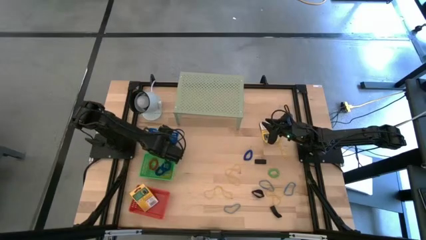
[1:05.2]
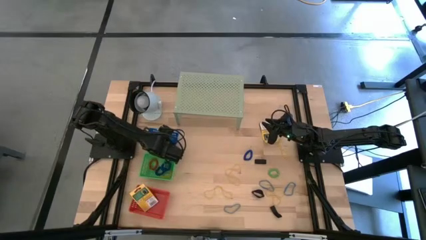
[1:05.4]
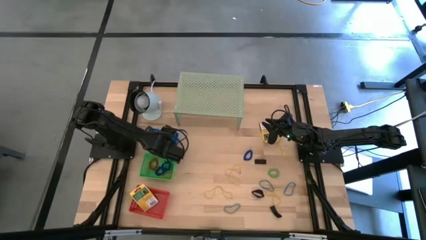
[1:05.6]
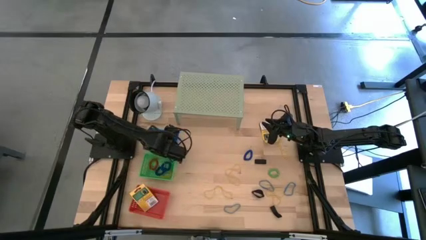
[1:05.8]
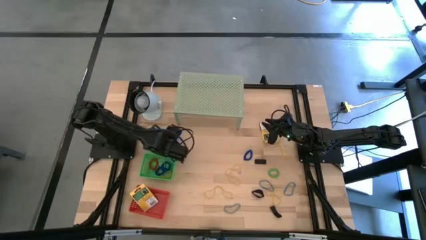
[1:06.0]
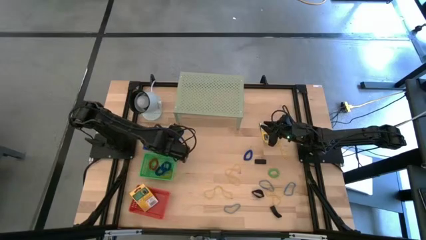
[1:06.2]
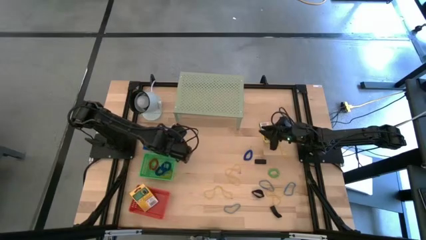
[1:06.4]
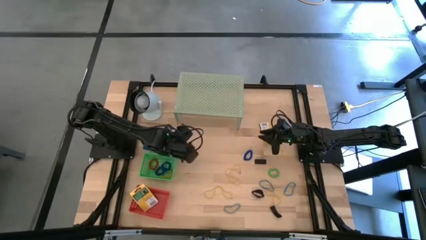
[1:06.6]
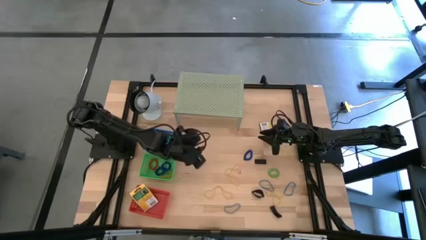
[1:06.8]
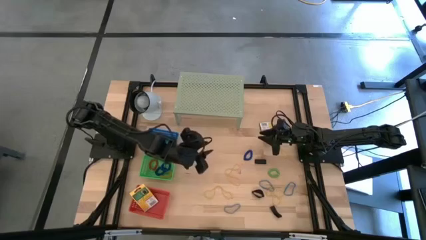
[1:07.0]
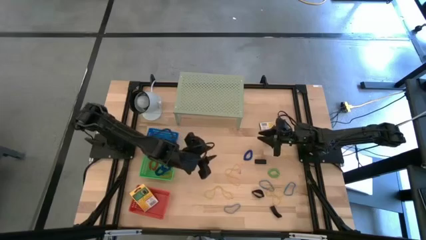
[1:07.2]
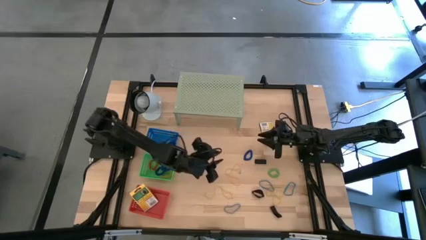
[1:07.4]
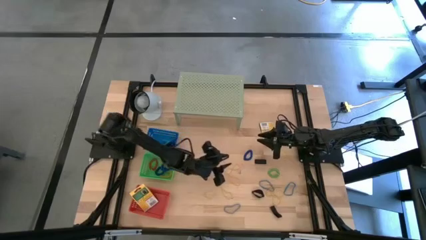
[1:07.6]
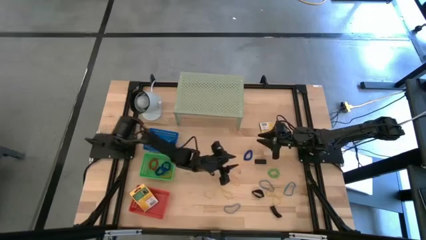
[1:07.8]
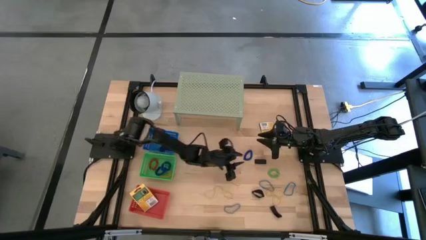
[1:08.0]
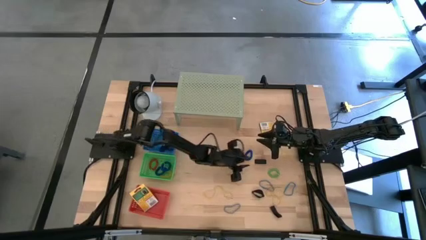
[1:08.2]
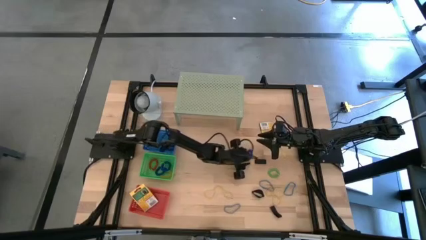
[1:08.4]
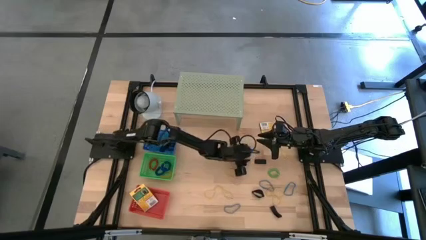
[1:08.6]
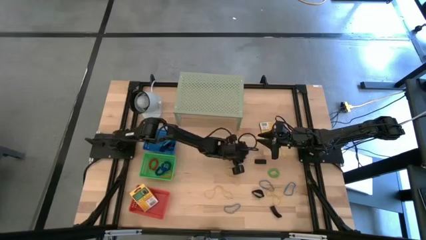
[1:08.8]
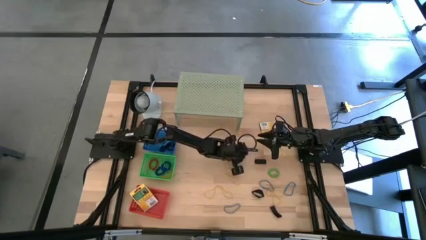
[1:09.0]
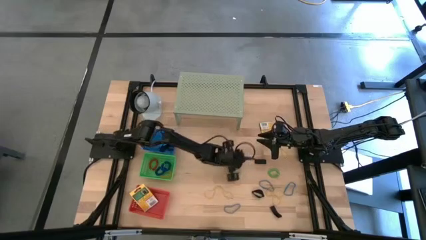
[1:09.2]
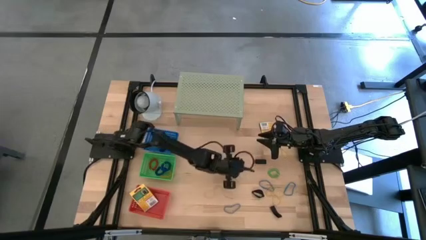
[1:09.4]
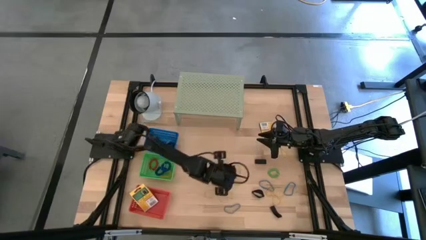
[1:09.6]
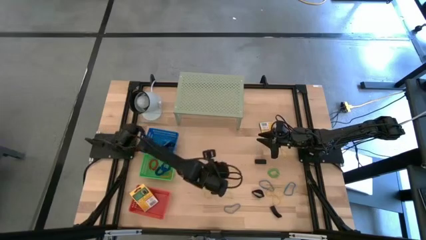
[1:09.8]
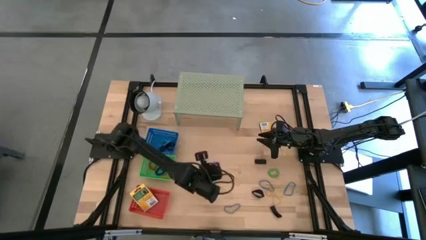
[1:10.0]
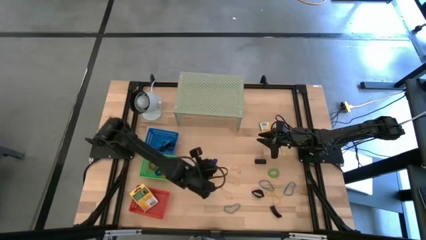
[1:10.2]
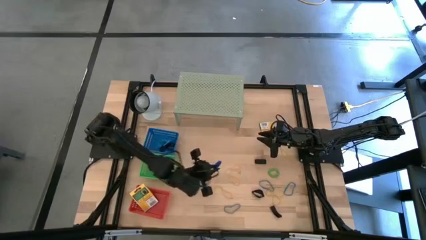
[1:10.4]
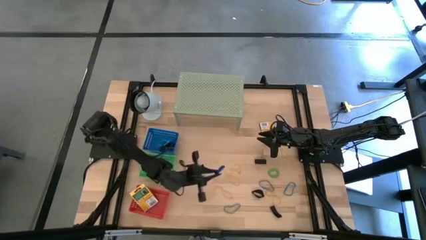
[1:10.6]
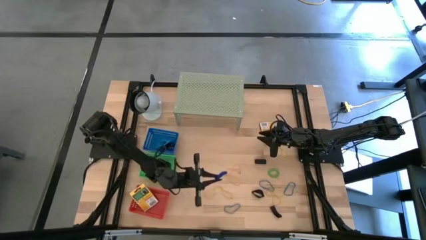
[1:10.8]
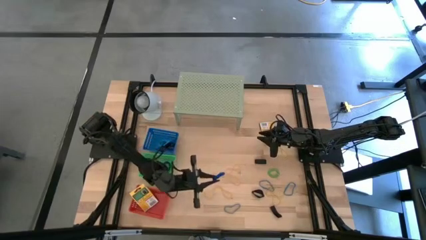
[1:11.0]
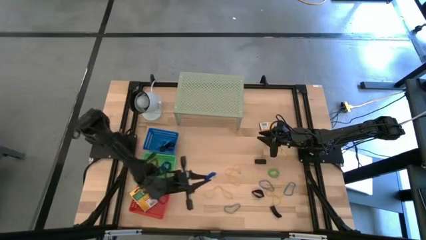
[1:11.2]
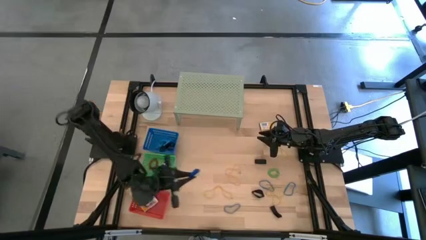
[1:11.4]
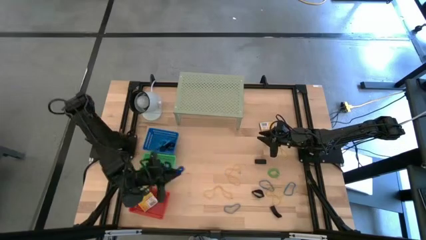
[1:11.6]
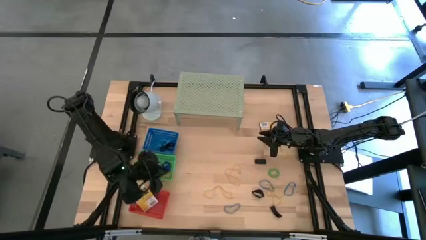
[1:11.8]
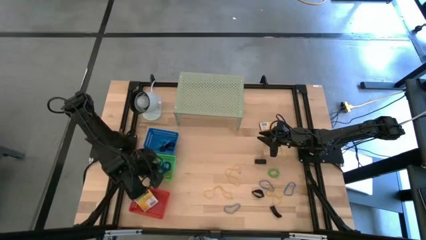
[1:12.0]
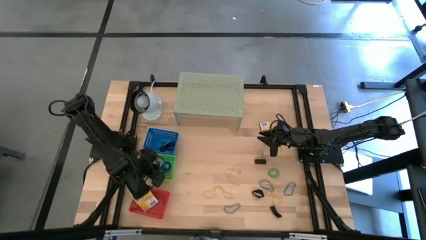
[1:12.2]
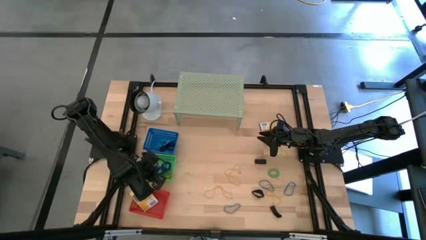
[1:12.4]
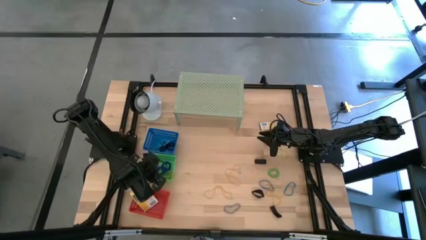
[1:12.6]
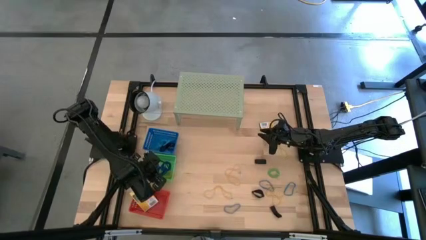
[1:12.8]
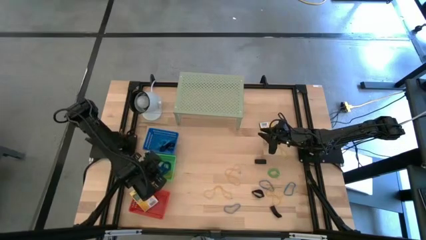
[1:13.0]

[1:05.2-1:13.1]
Task: Pick & Place Office Desk Supplies
Put the blue spring keychain into the green bin

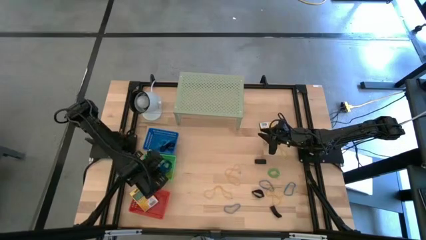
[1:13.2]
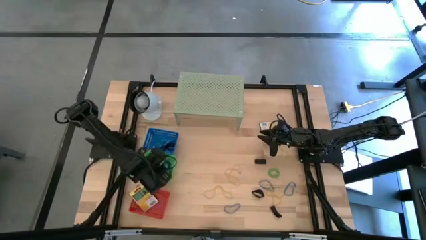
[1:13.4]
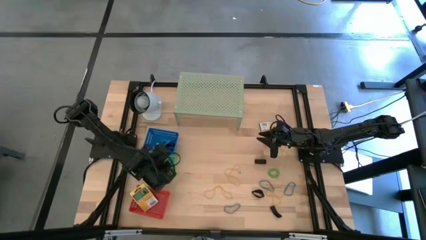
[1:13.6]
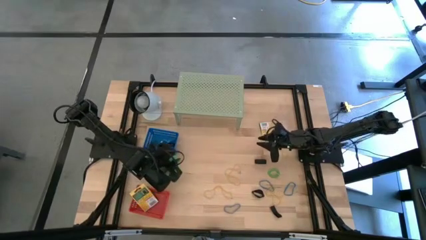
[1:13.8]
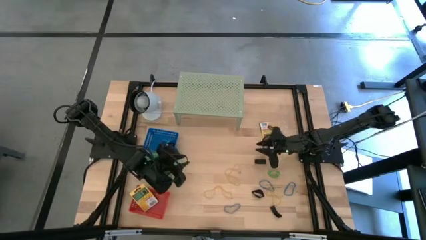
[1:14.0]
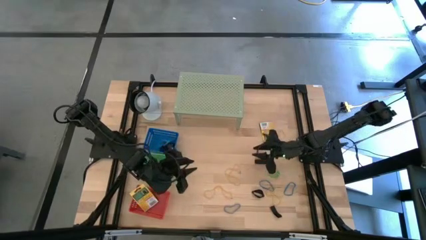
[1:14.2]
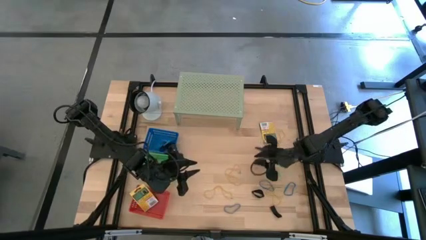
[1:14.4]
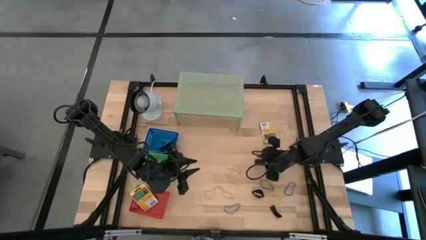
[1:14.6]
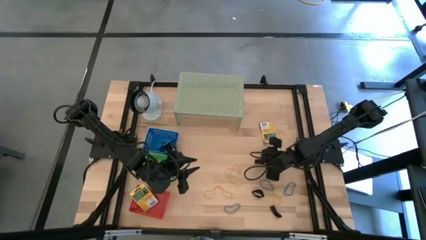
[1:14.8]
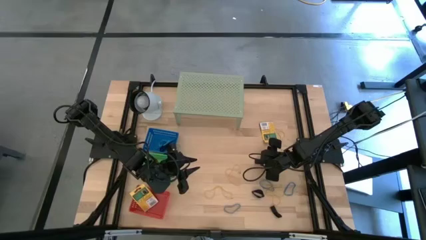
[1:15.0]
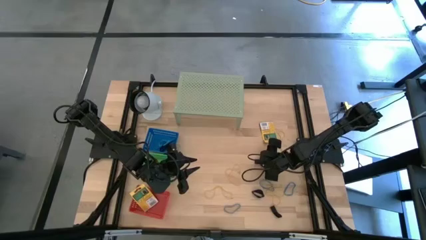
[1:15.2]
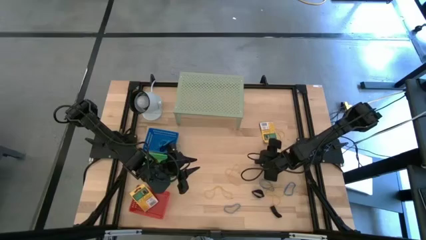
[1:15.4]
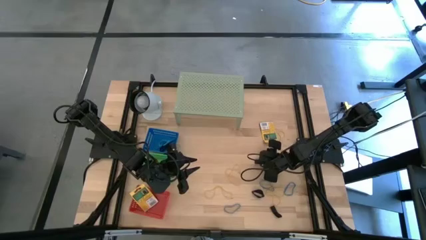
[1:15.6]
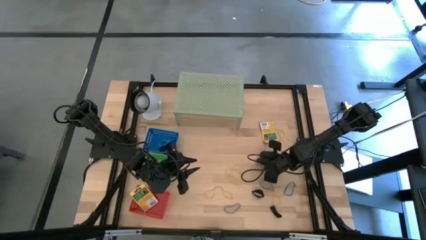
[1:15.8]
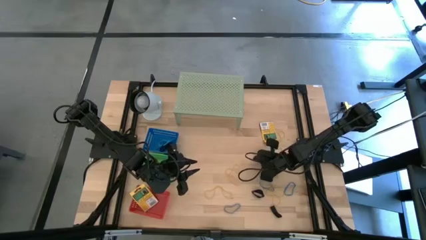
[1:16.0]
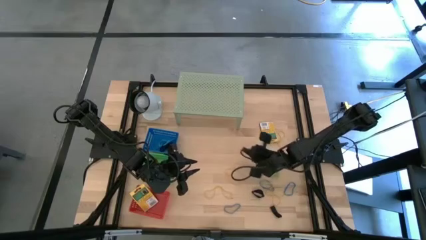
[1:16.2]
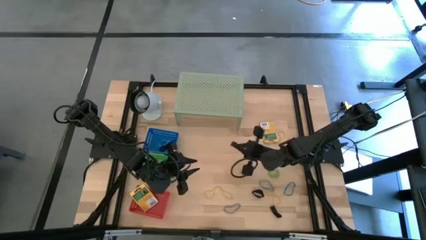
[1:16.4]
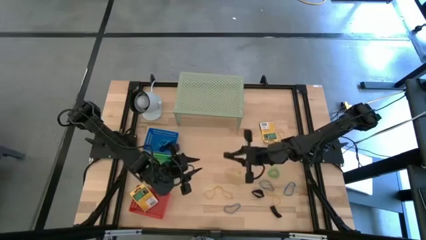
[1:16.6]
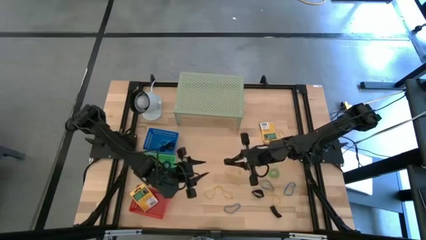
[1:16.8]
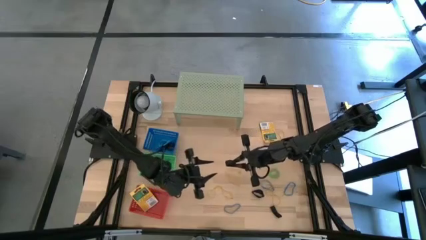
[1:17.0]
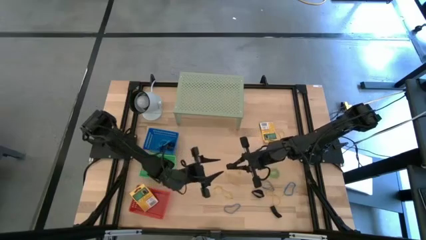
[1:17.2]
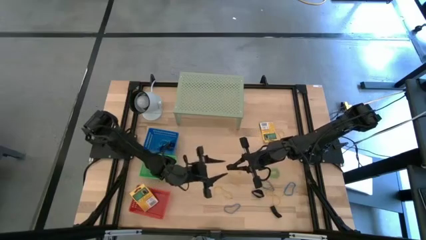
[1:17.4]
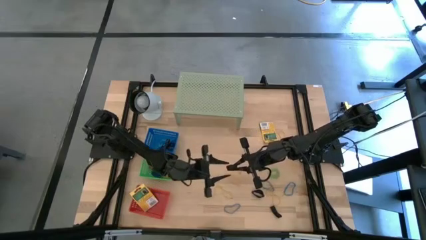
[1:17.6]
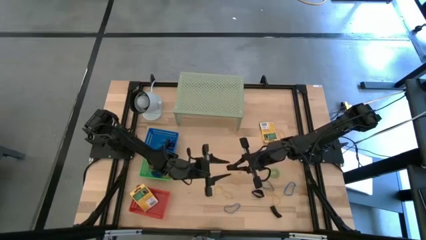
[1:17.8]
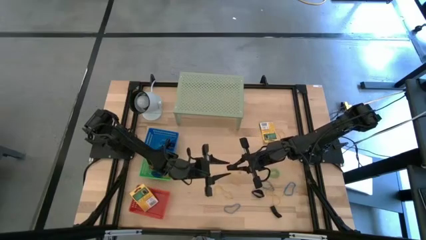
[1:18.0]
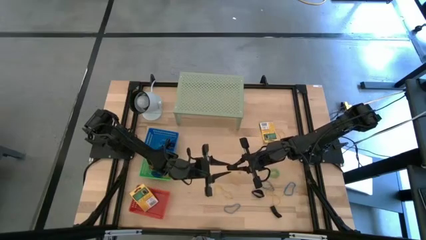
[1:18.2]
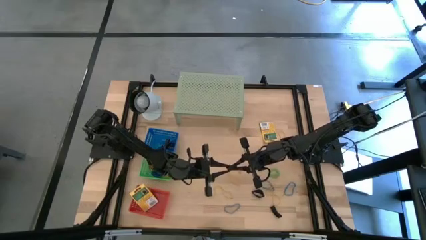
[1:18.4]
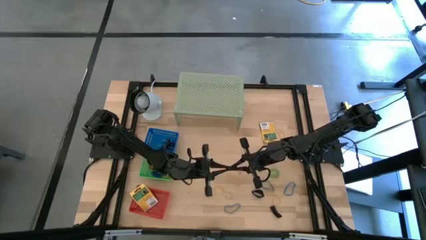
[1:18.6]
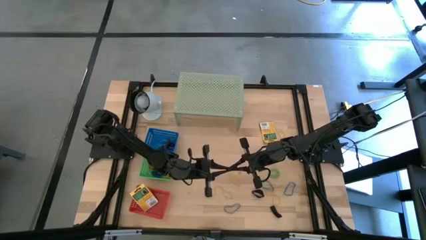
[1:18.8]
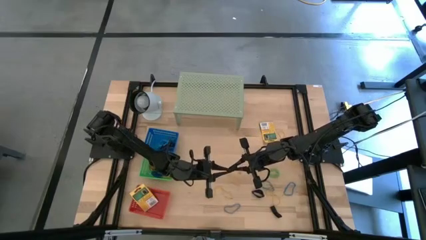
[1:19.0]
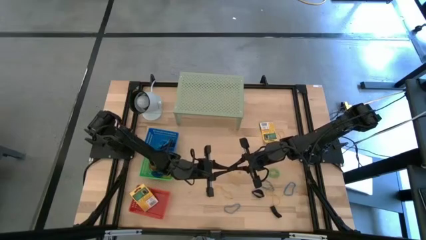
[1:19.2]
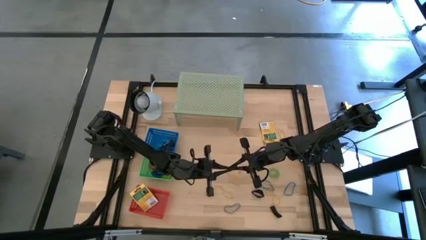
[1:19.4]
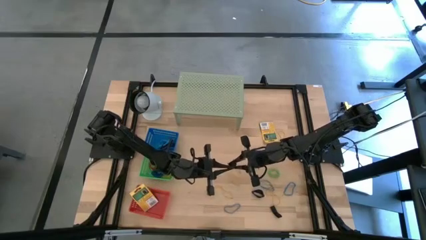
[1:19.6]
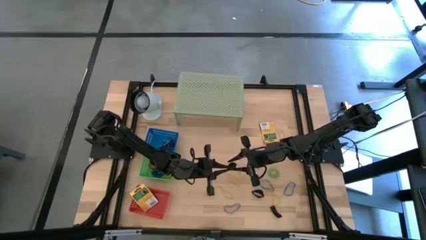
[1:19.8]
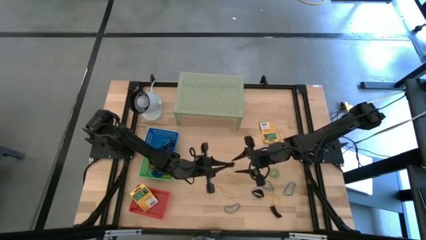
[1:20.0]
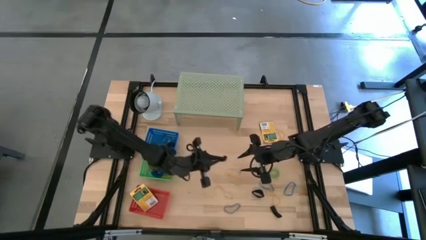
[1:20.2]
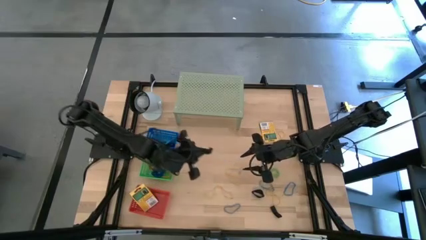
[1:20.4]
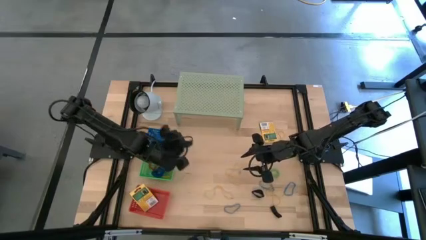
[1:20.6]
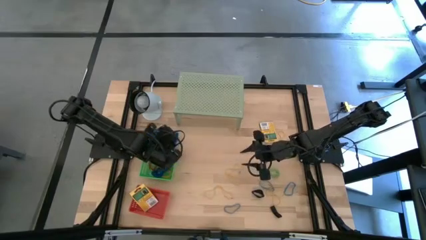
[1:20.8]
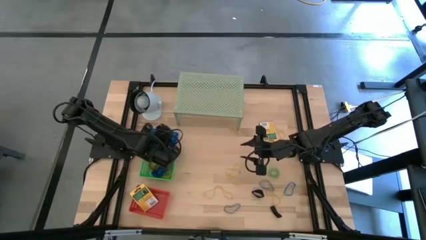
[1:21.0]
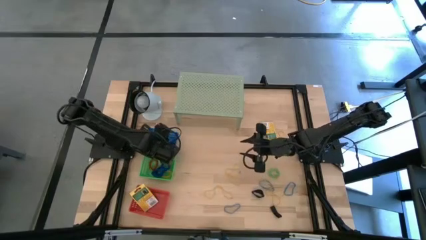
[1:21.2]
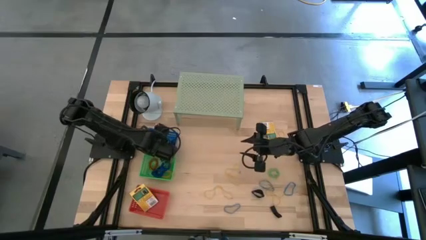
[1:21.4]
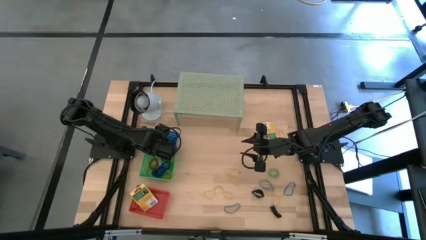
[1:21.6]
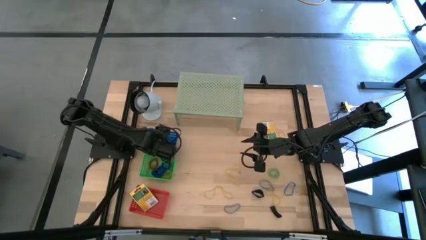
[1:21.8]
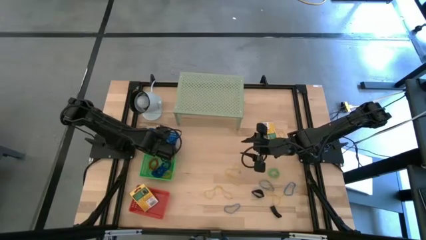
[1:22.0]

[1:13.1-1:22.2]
Put the black rubber band into the blue bin
